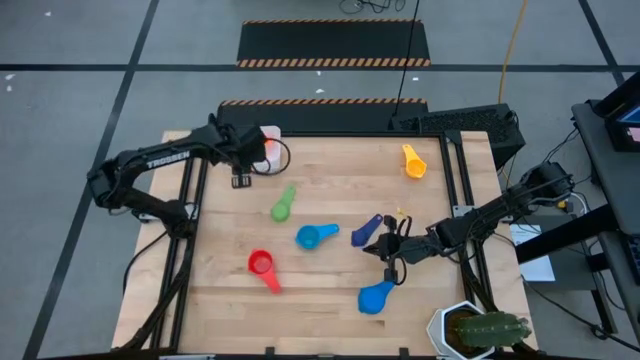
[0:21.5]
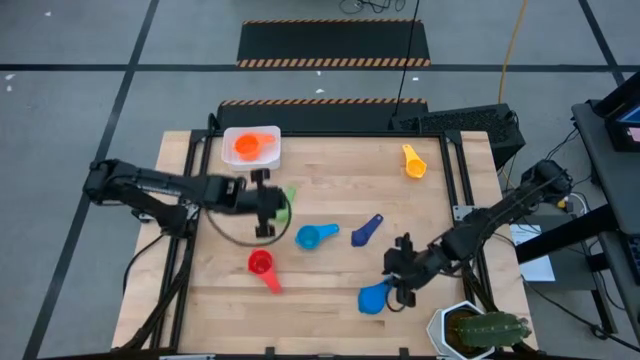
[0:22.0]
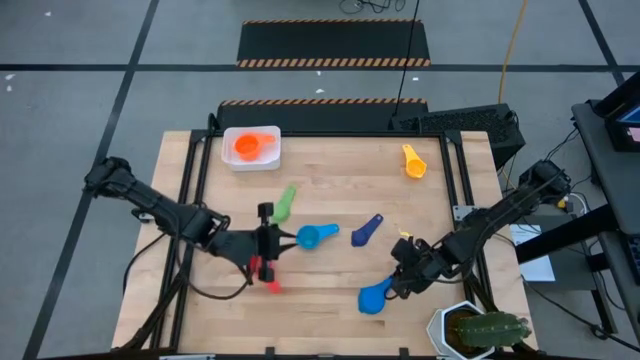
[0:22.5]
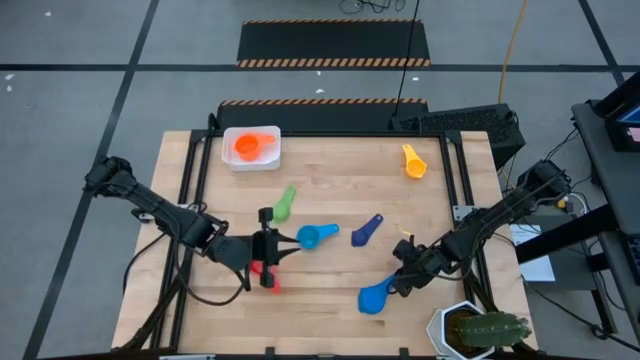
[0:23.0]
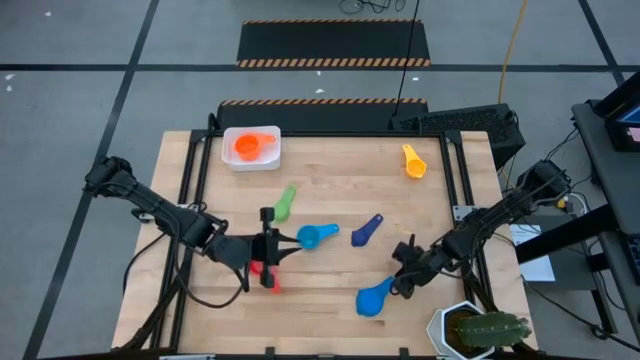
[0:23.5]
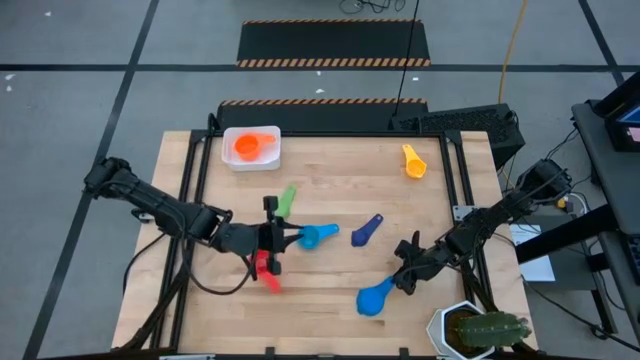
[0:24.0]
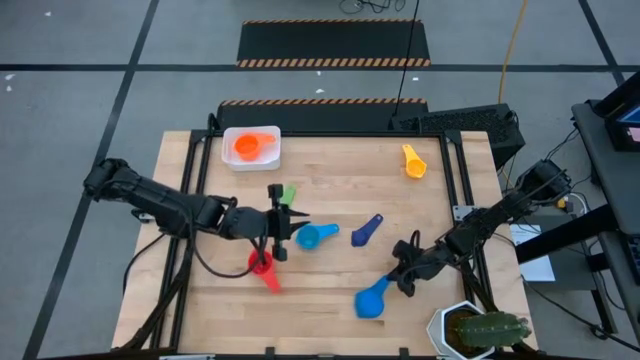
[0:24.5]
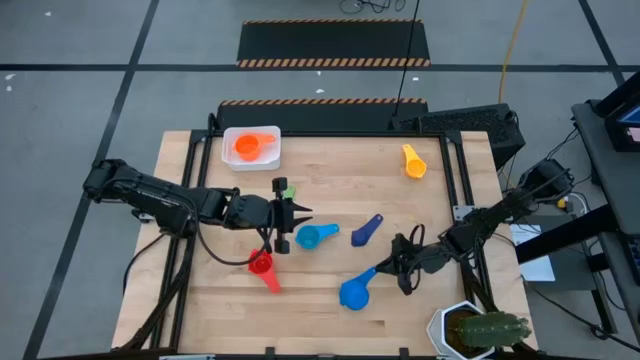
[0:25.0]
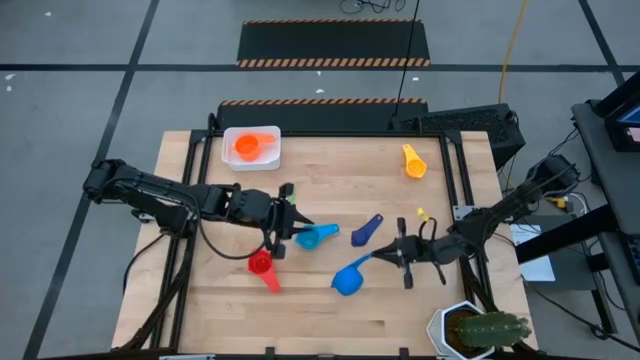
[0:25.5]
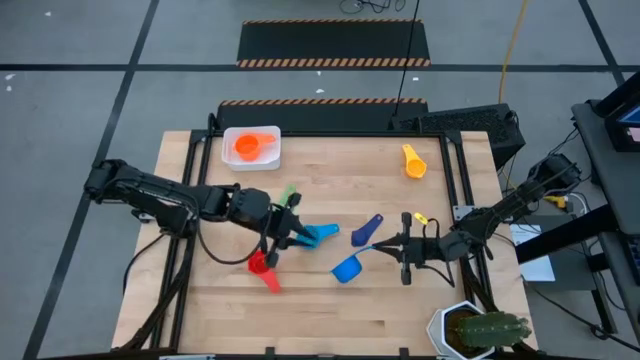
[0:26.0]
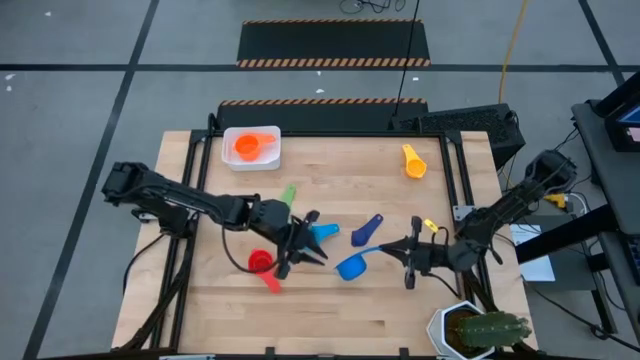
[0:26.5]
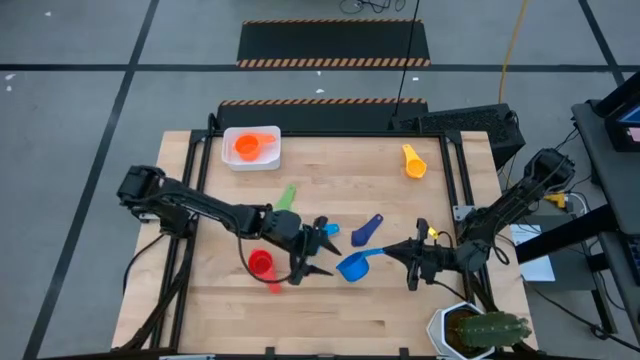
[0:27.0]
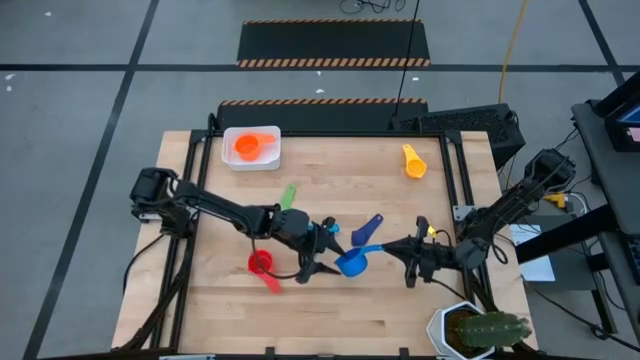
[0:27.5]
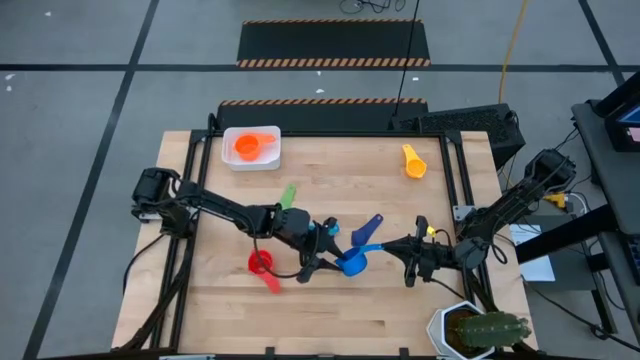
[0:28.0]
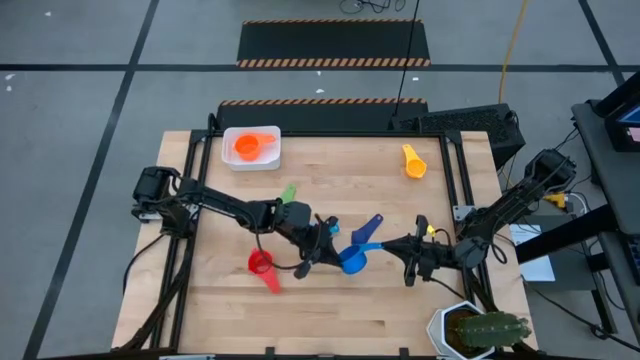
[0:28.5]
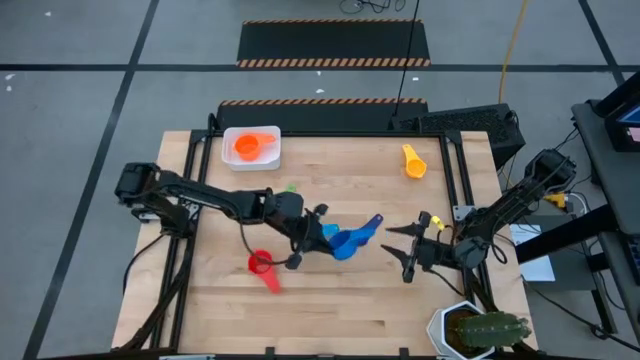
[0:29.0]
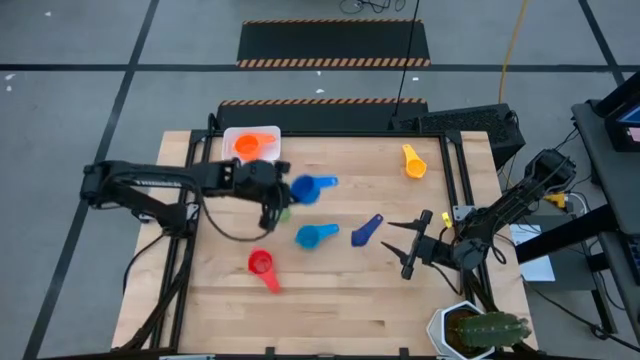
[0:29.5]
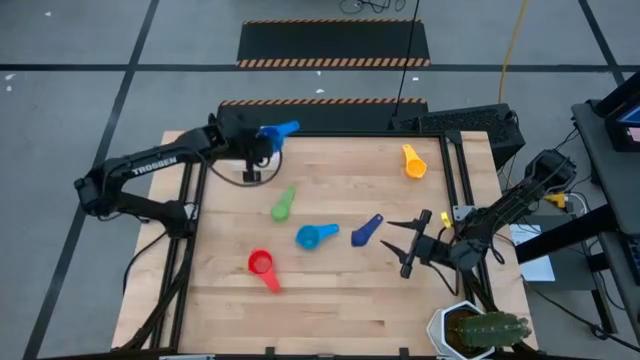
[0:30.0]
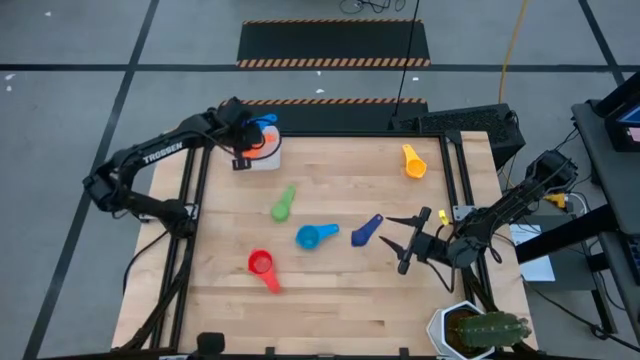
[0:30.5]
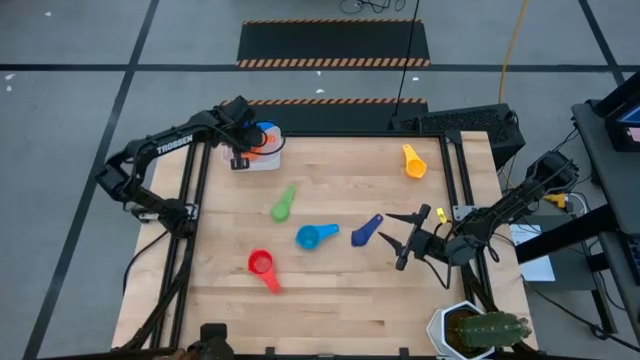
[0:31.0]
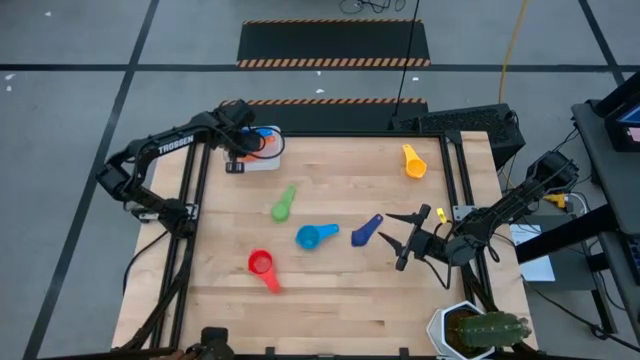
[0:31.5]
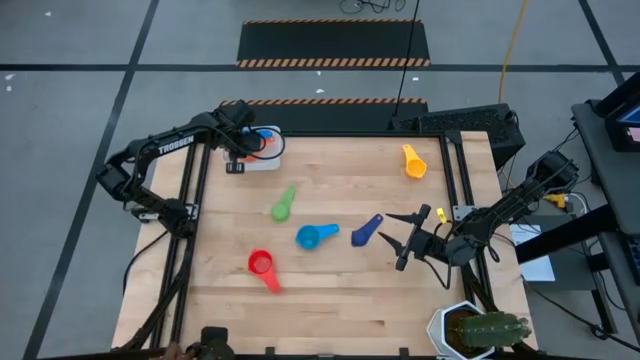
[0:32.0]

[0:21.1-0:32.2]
Task: Nest measuring cups in basket
Stack the blue measuring cup into the orange measuring cup

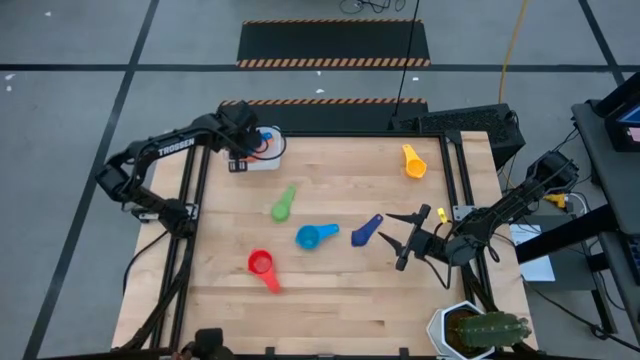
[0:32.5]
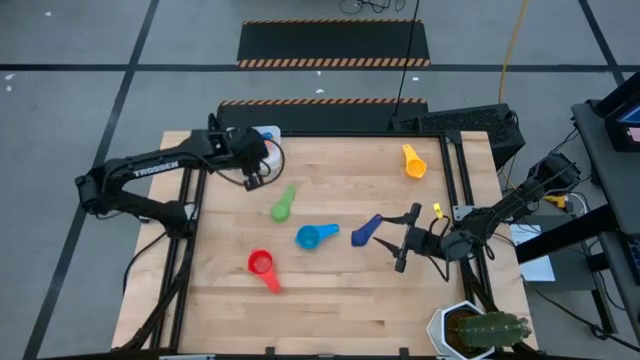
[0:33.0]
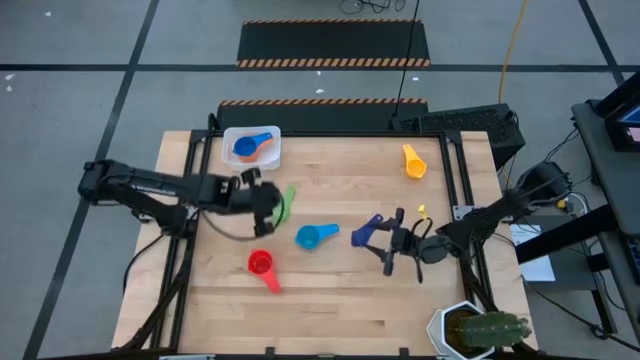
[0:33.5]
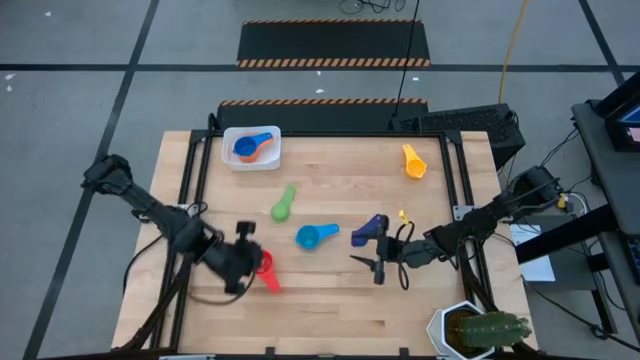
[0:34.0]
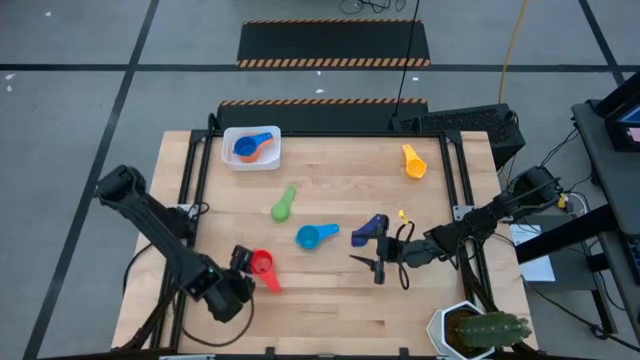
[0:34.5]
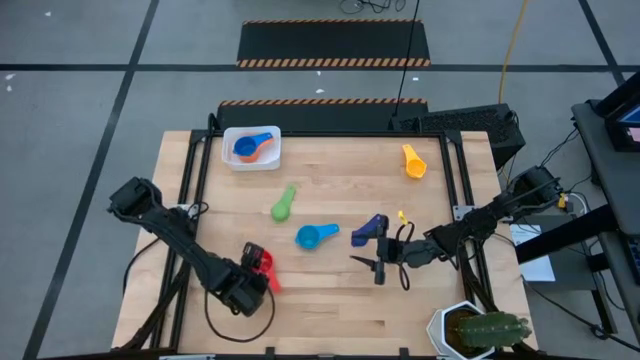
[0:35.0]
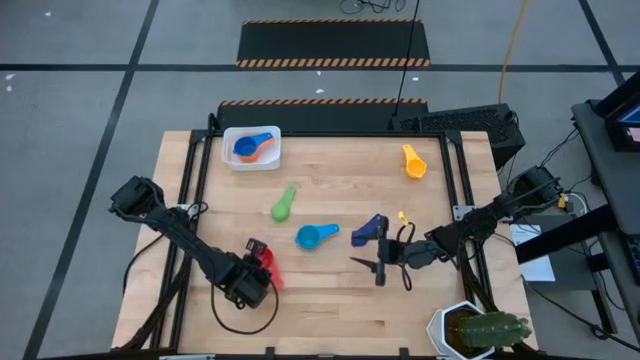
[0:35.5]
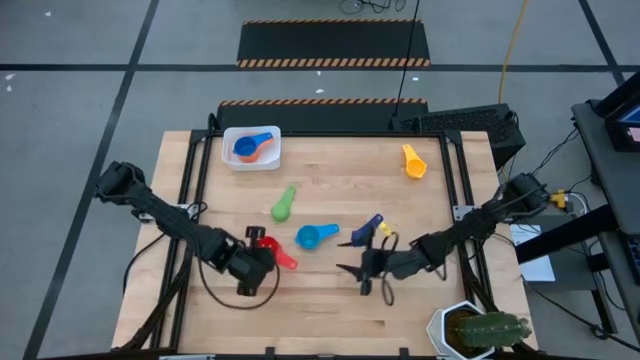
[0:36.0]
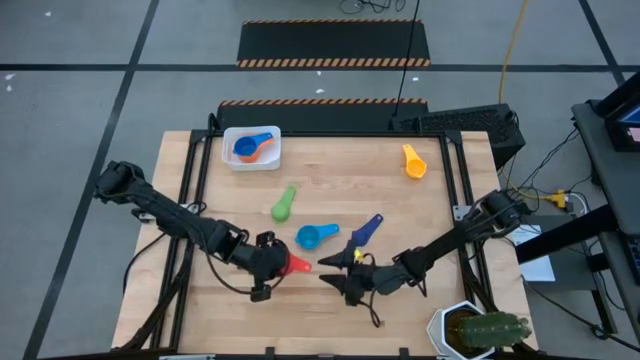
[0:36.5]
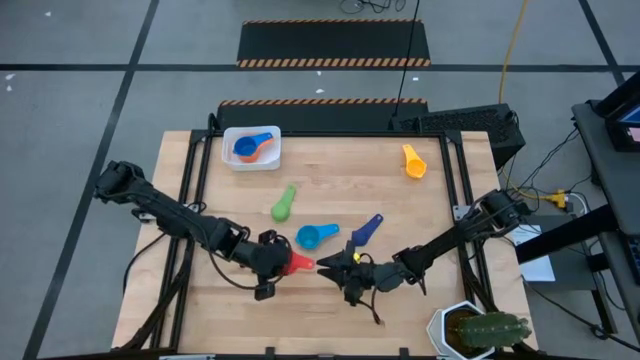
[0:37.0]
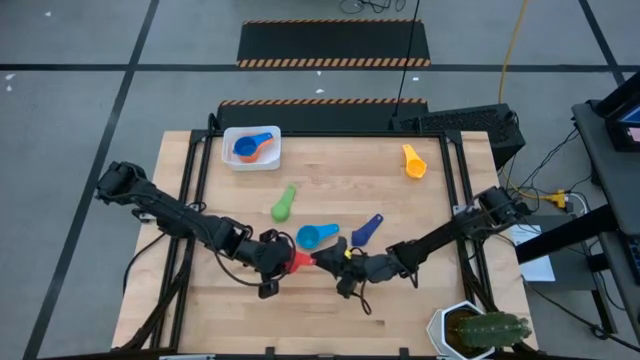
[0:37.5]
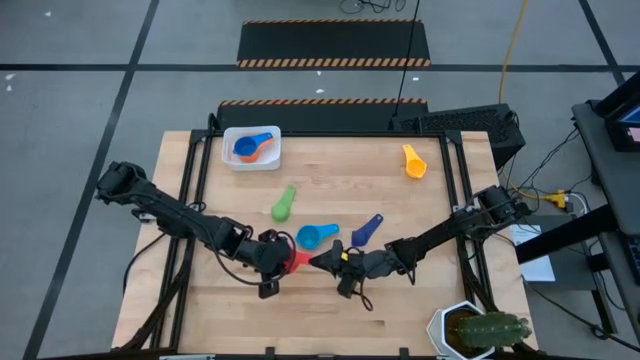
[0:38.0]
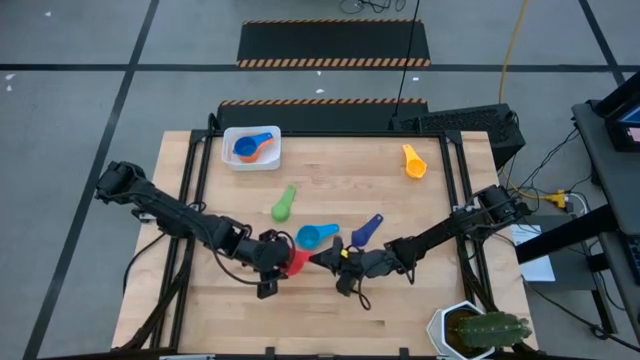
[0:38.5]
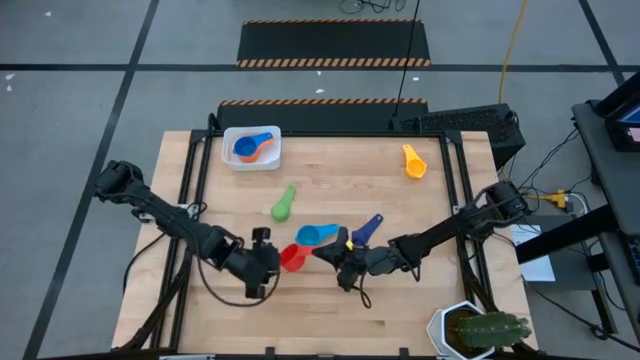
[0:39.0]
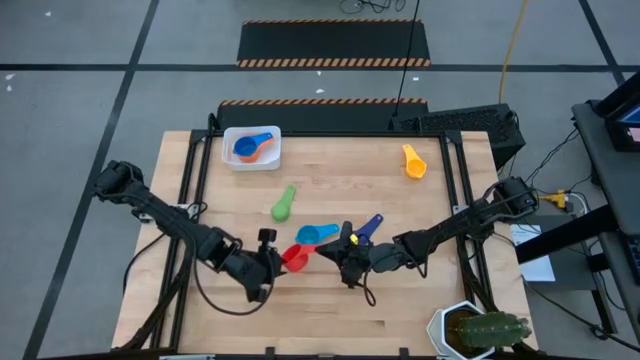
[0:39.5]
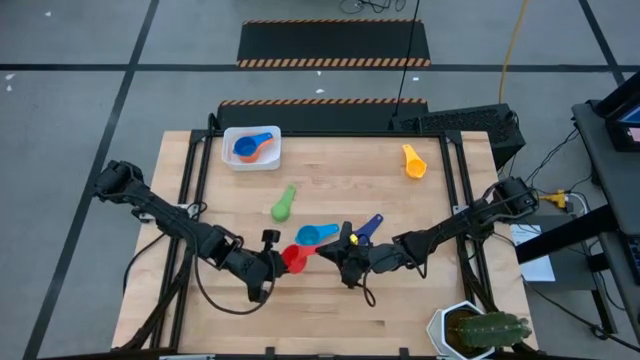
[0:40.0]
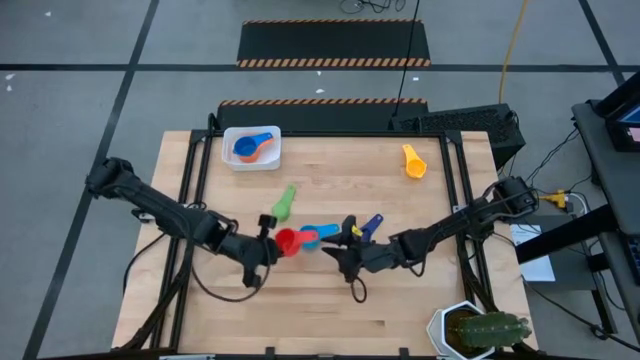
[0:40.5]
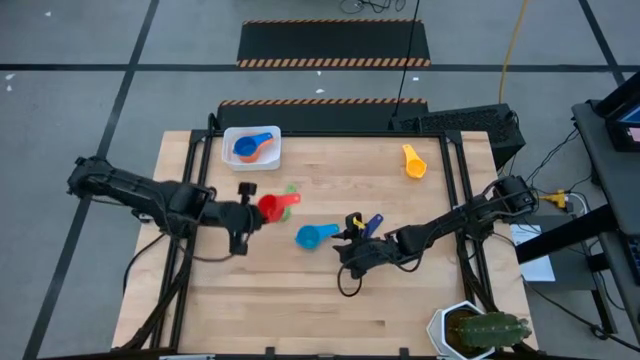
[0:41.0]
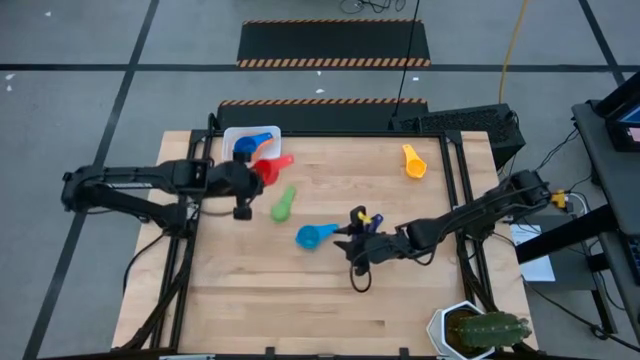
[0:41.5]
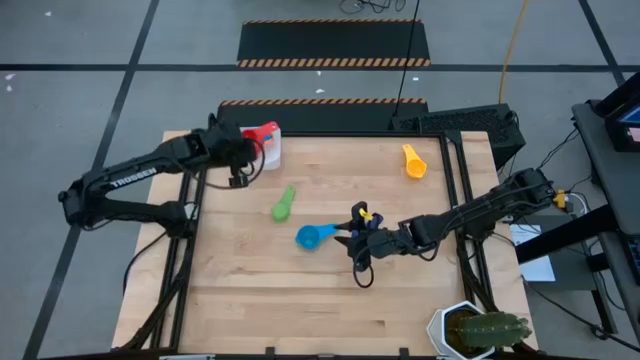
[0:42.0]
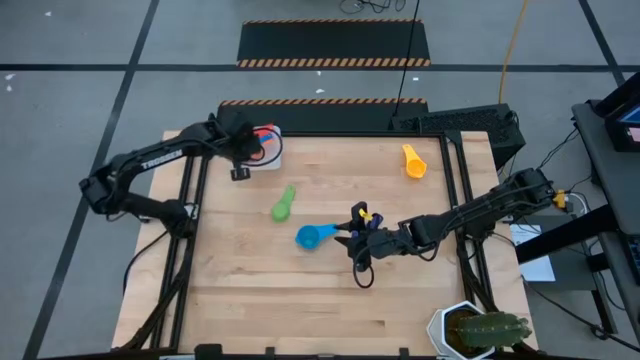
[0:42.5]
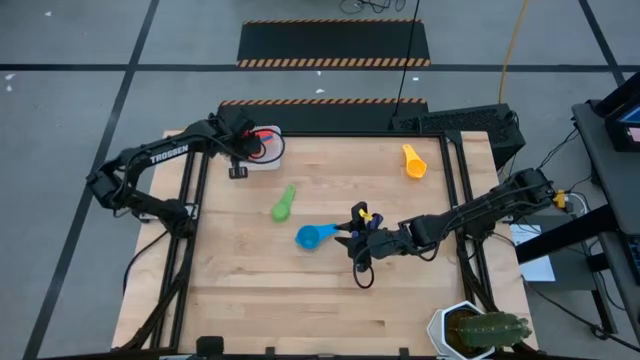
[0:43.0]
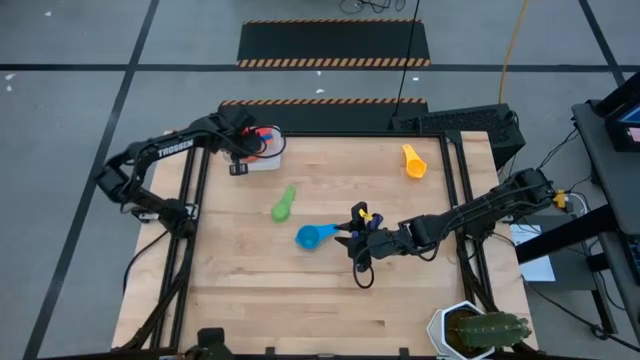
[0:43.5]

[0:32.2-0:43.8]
Stack the red measuring cup into the blue measuring cup
